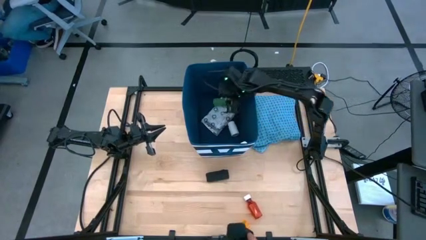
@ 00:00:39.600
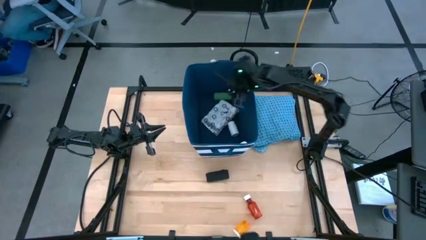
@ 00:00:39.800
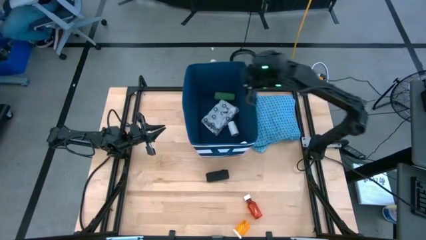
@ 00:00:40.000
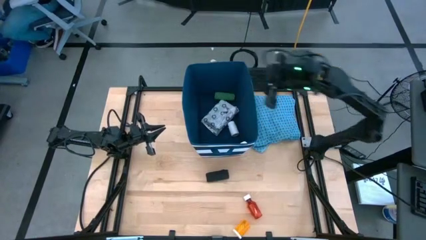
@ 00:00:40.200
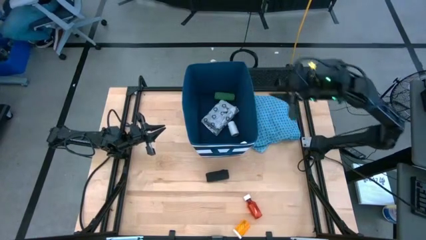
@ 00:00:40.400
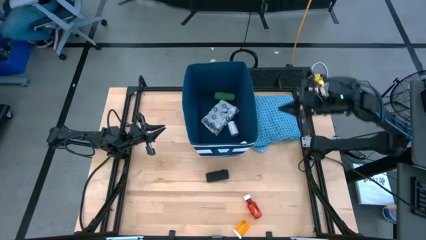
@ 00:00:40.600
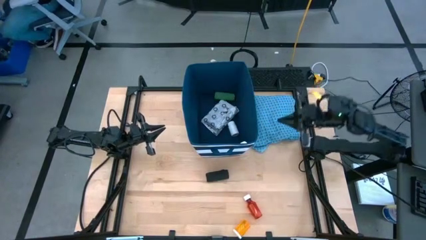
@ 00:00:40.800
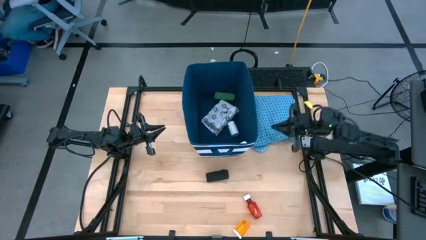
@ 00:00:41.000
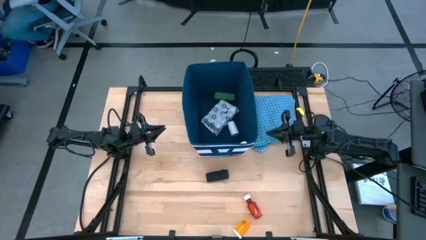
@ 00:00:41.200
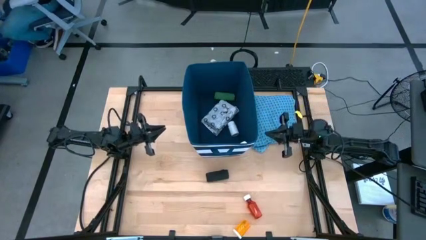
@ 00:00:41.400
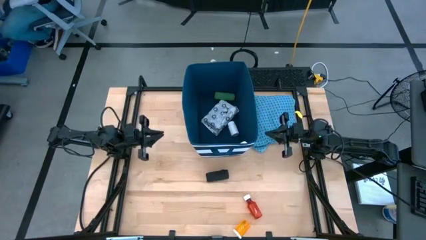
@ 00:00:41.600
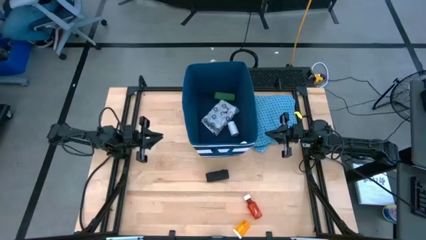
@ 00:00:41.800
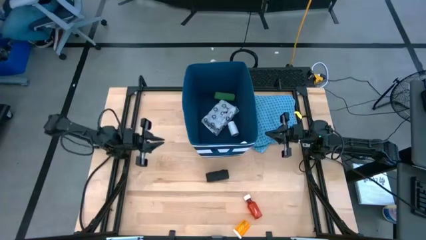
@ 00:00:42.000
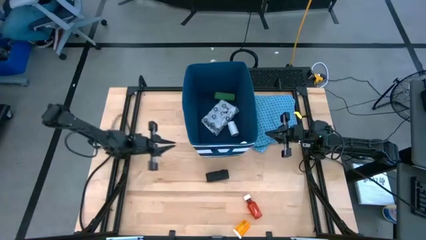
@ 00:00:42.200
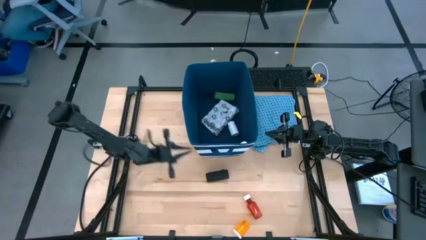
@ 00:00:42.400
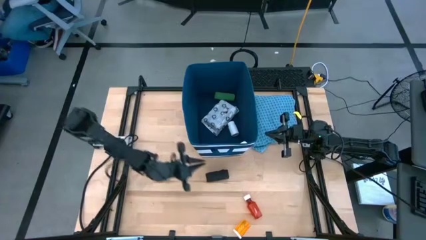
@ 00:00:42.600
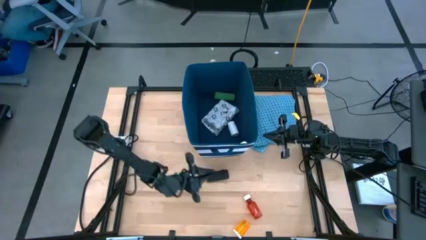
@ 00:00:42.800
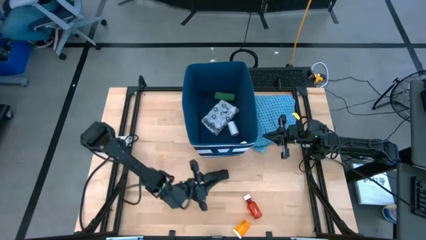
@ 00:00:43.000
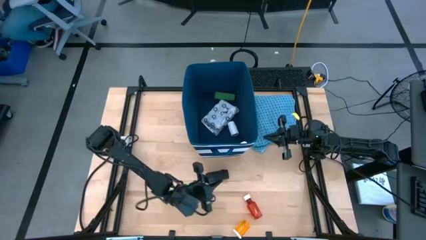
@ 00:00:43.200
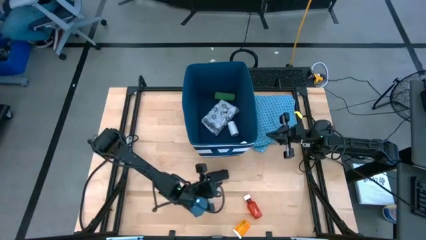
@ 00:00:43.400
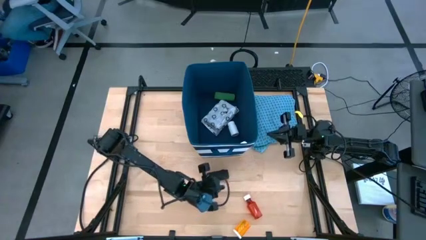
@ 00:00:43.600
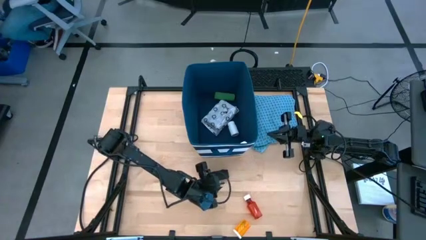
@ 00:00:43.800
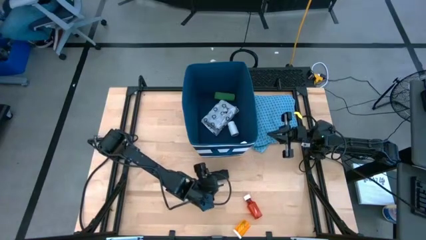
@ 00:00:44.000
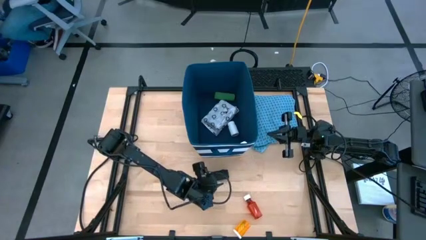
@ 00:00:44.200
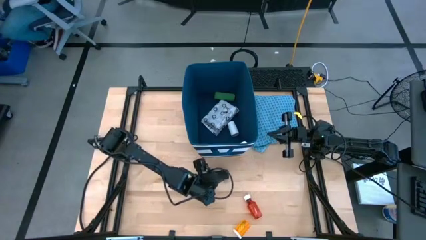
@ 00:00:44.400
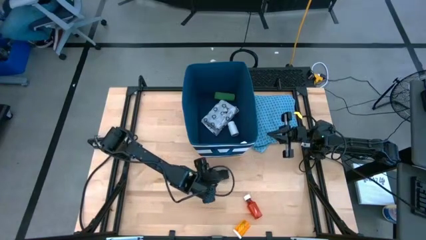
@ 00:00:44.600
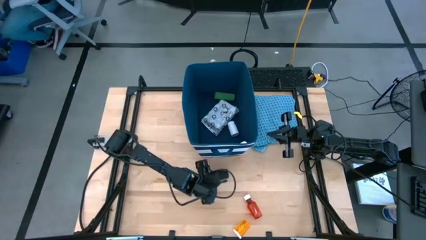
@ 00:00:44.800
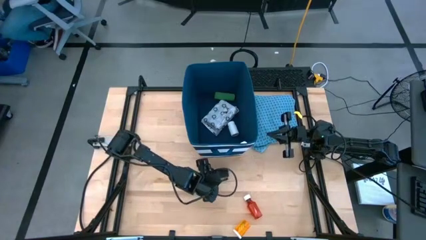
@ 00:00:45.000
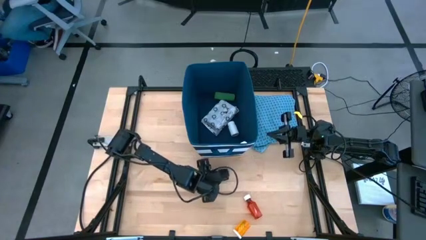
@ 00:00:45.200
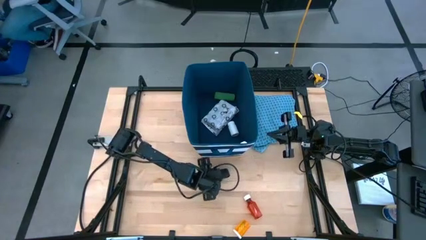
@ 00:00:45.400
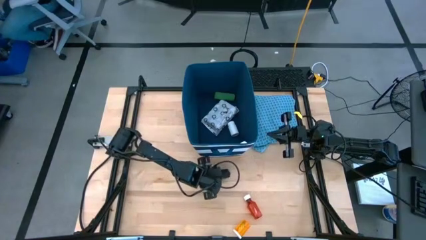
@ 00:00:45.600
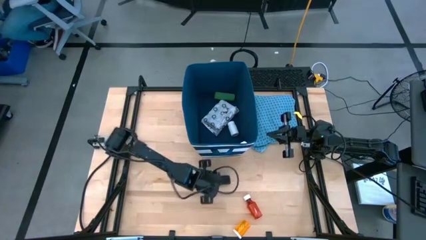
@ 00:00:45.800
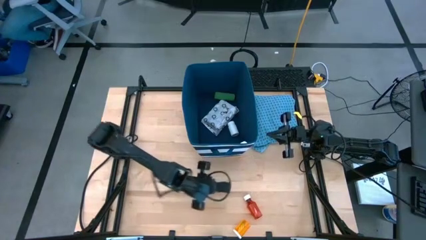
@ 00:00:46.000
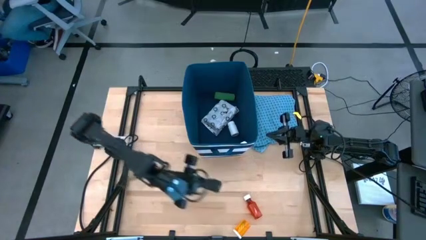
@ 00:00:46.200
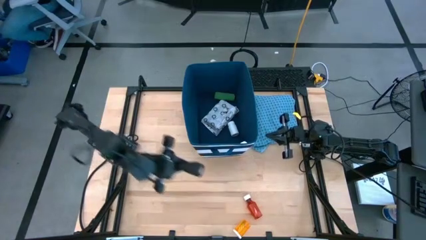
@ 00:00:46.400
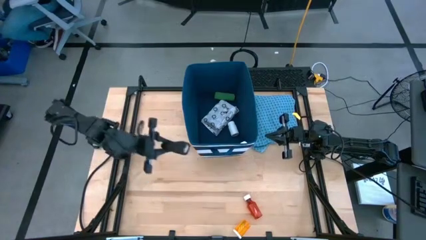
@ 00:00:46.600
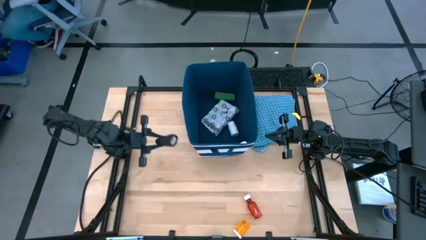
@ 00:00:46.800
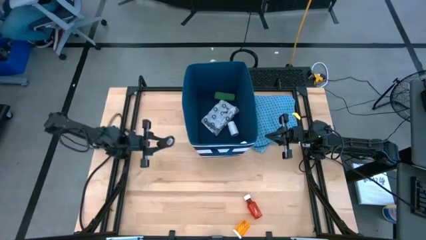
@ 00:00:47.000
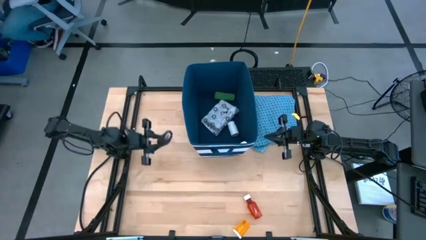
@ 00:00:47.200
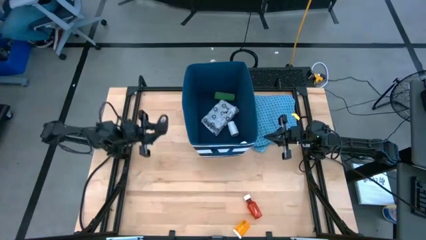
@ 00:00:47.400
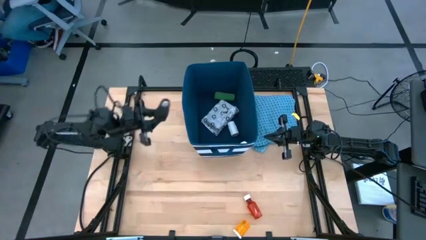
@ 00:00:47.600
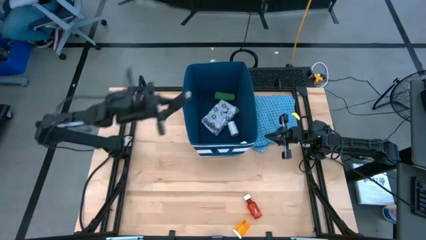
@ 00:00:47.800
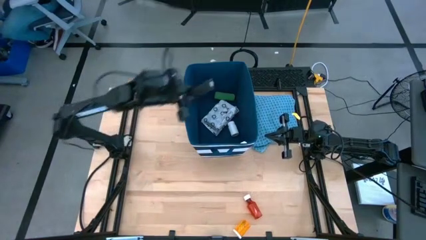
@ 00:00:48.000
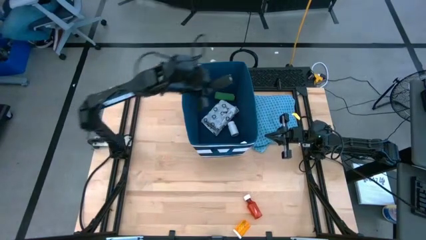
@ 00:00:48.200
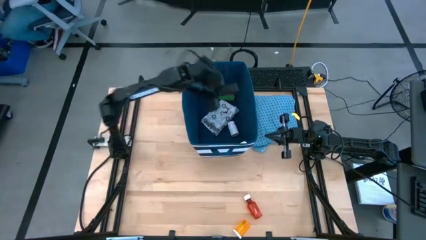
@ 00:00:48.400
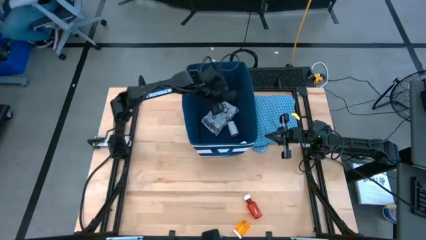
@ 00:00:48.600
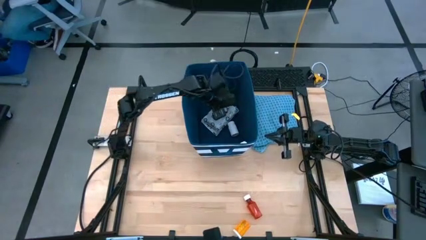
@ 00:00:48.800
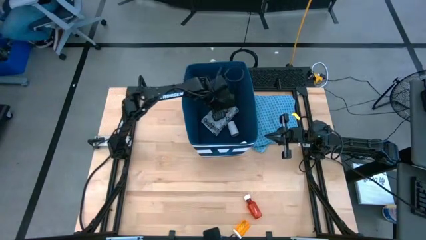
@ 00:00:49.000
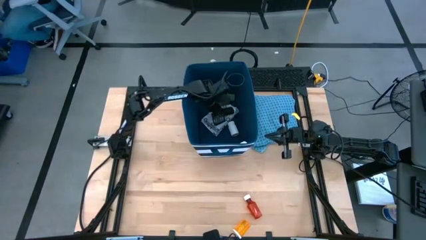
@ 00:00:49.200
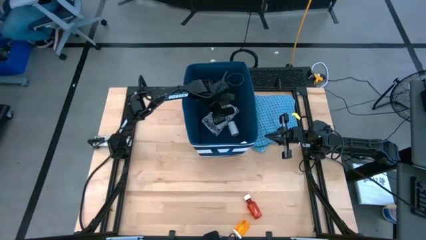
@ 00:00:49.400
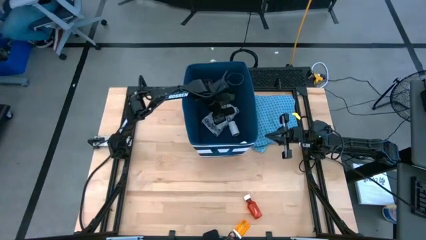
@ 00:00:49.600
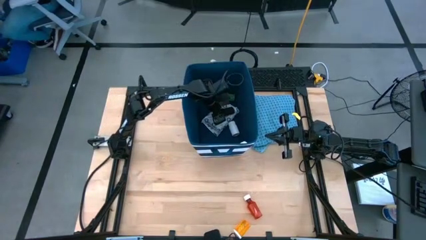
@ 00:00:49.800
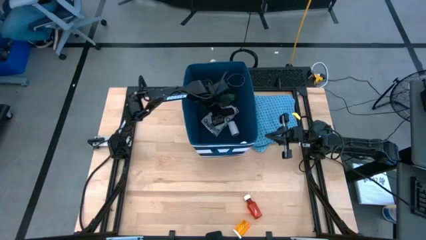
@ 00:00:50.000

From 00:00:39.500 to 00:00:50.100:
Task: Pick & place medical supplies in basket/bin
Put the black bandage into the blue bin
